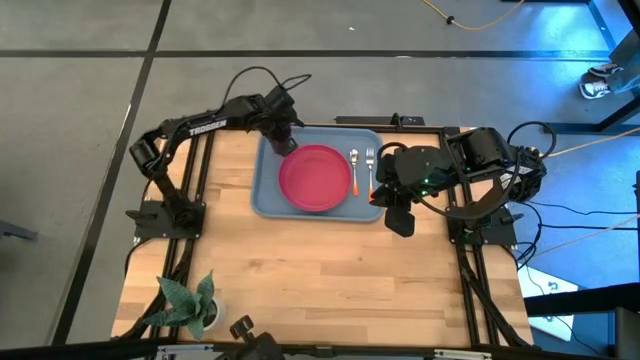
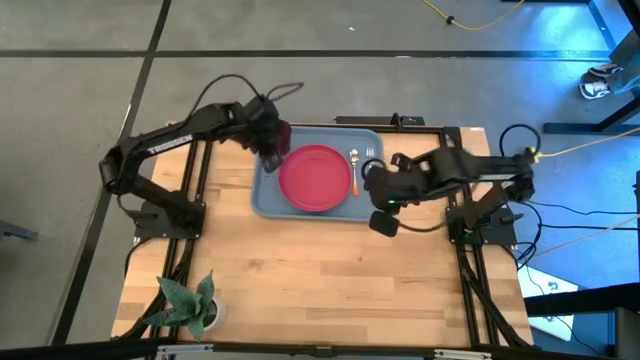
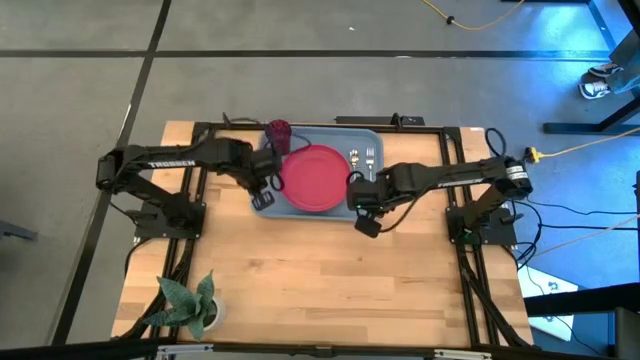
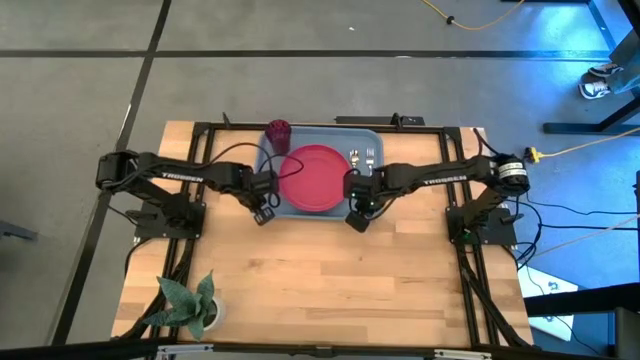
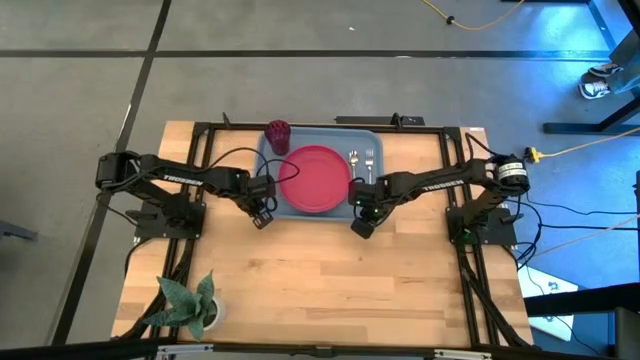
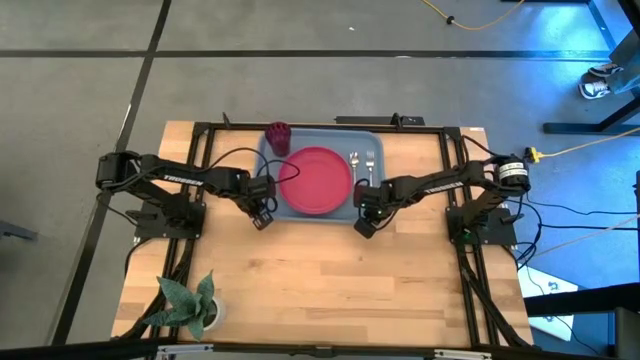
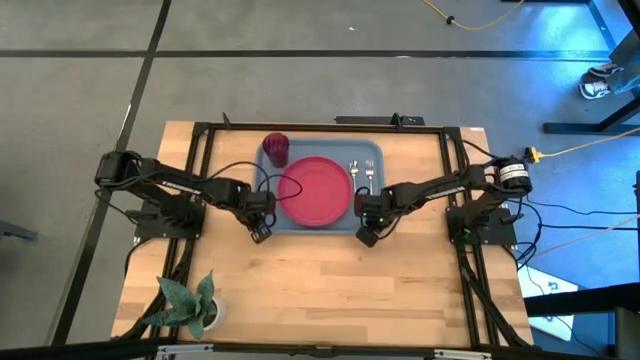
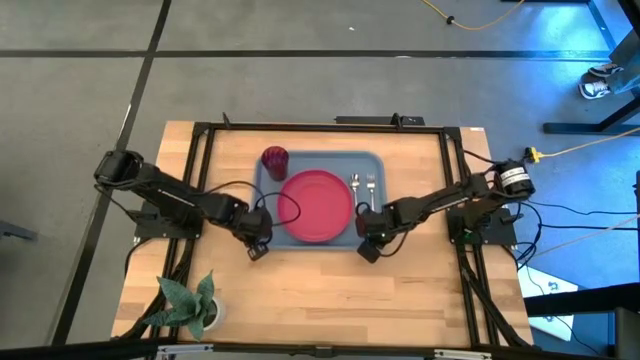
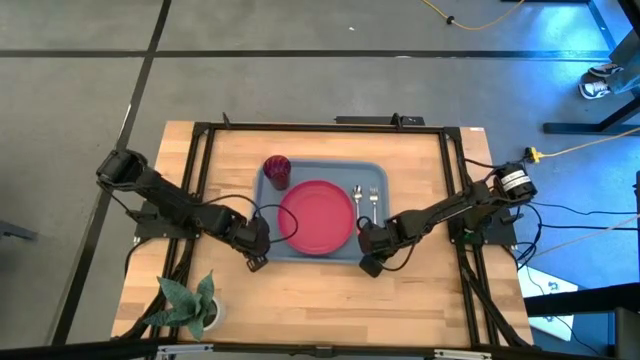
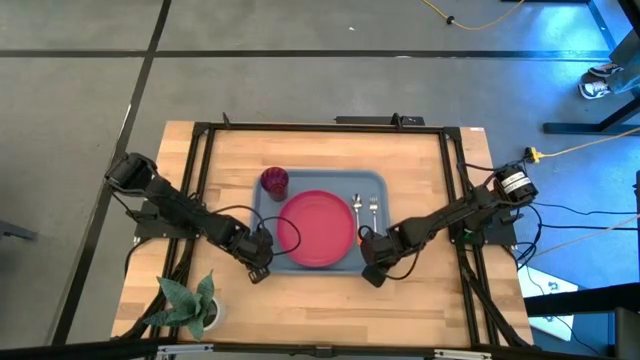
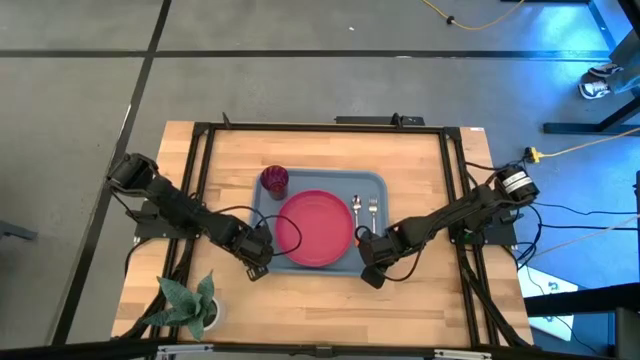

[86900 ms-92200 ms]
Task: Pick and place plate/cup/fork/spoon on tray
Move the blue serving tray to the middle of the table

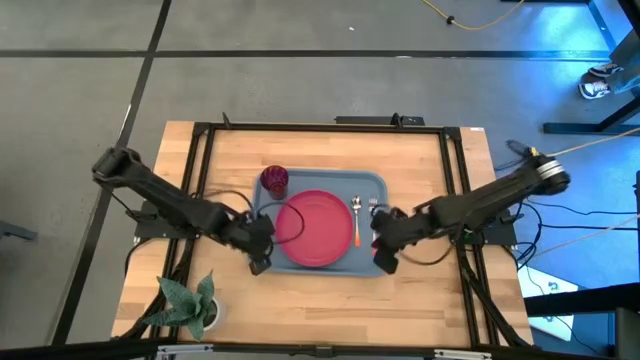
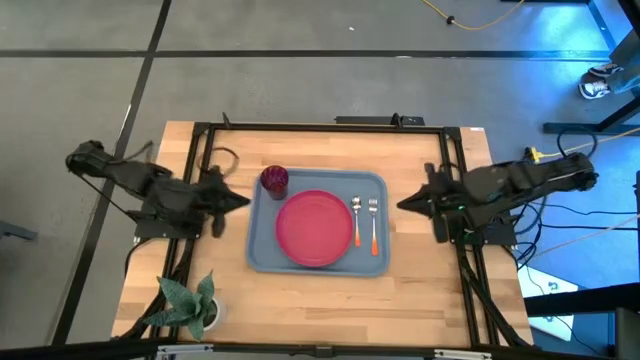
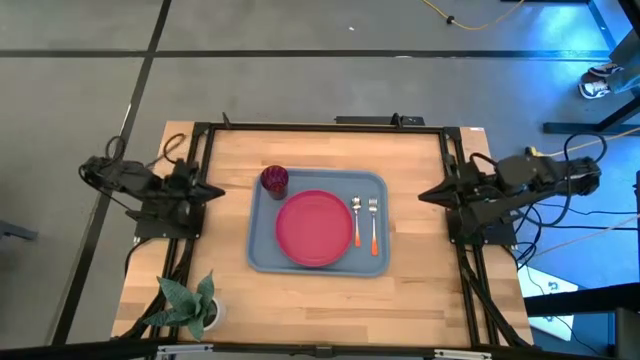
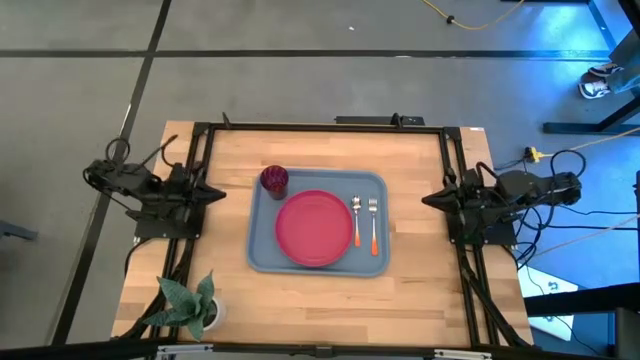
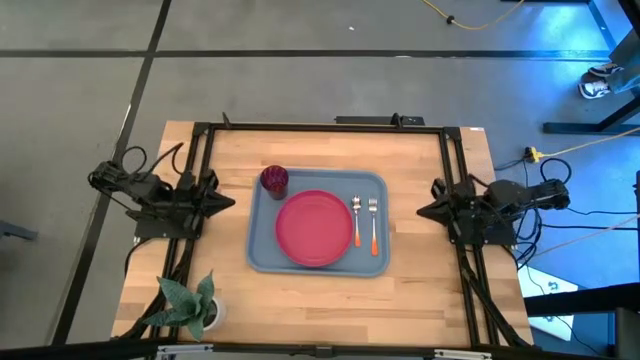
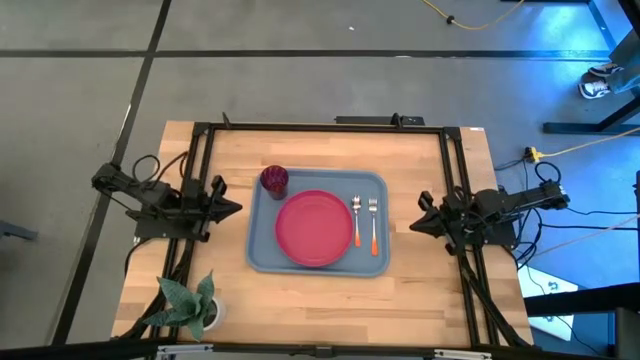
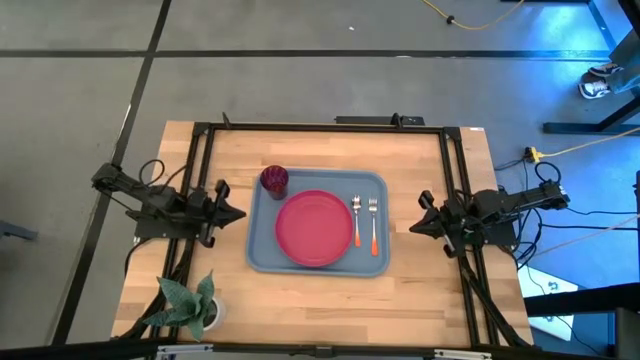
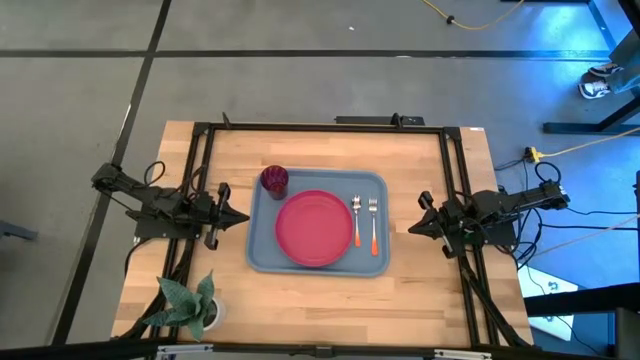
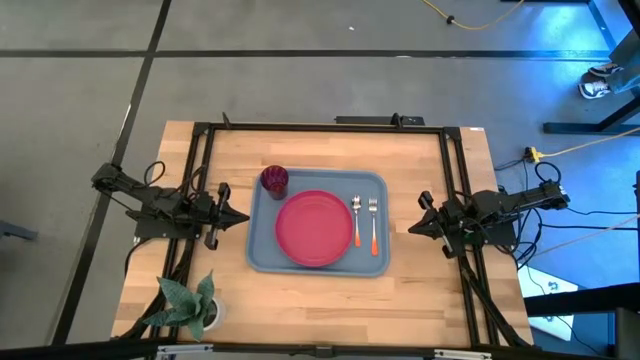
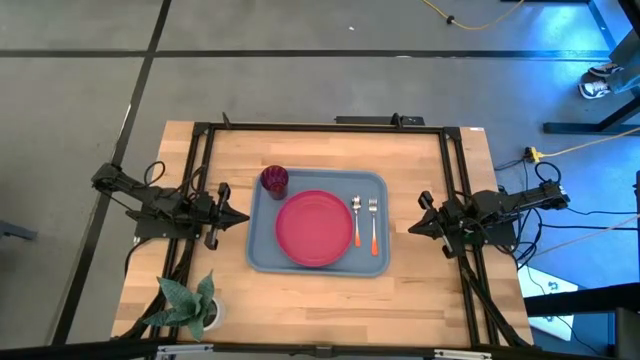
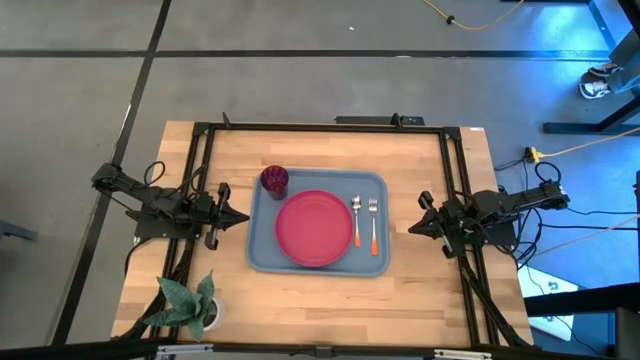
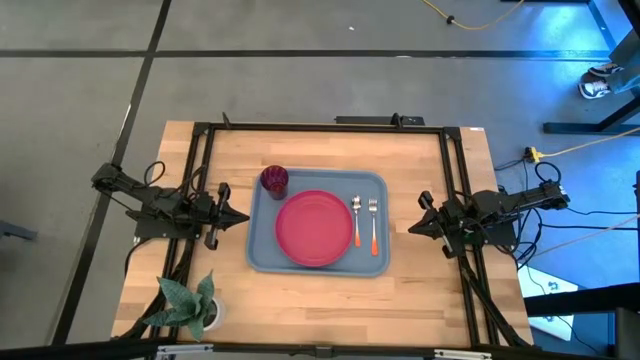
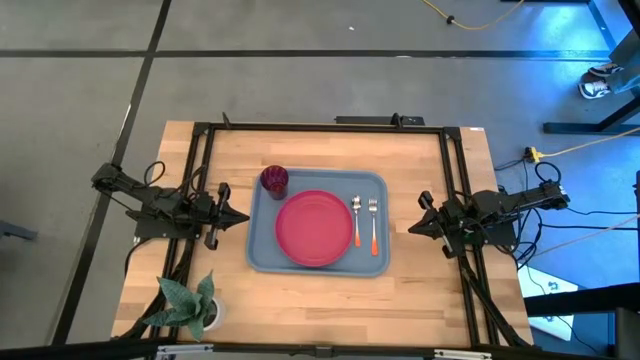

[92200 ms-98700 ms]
Return to Home Position

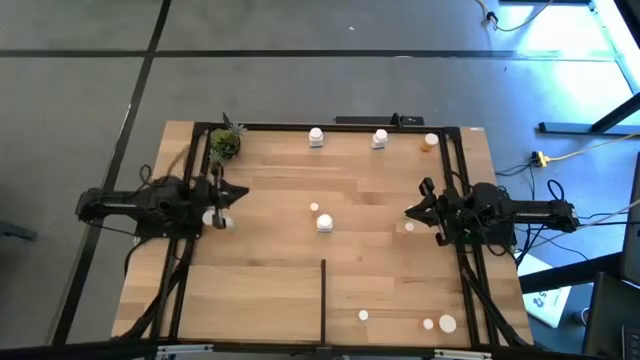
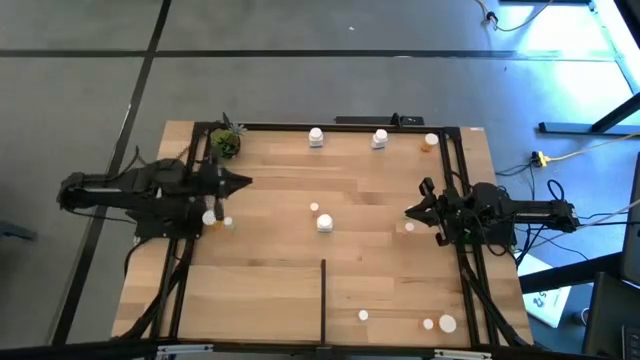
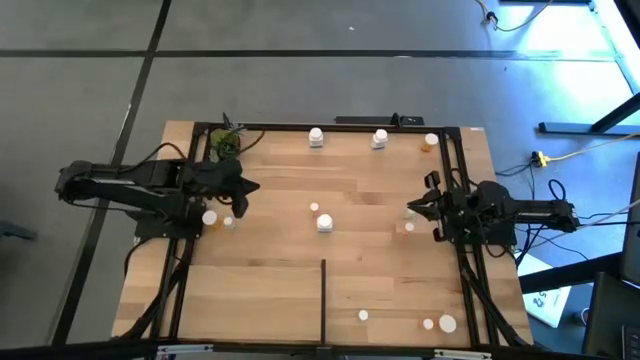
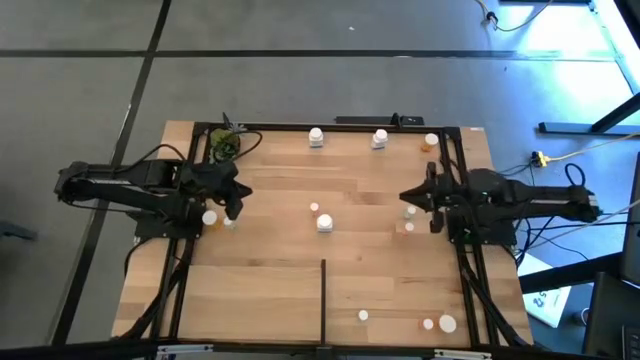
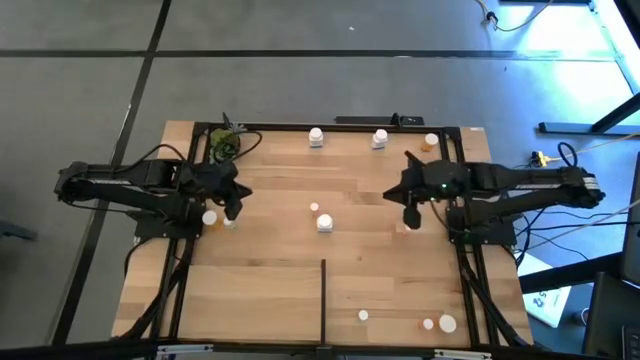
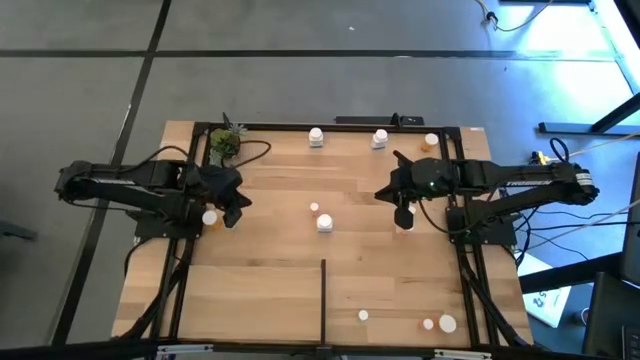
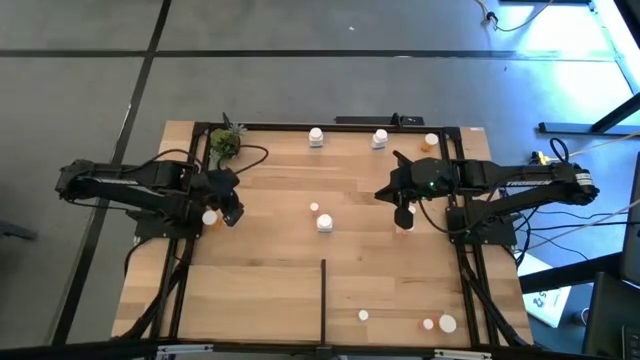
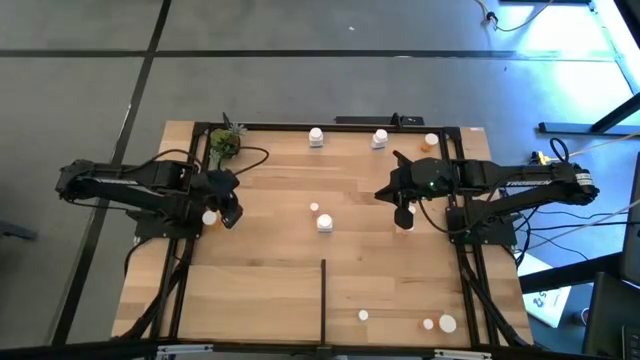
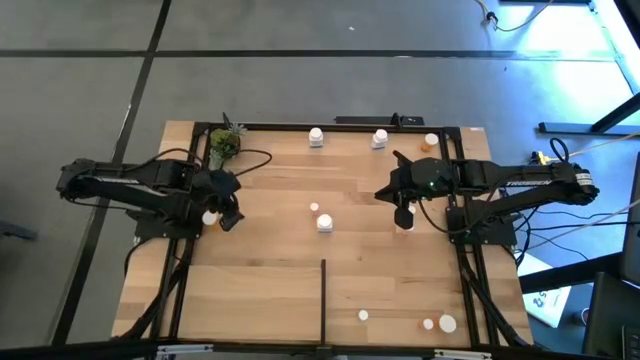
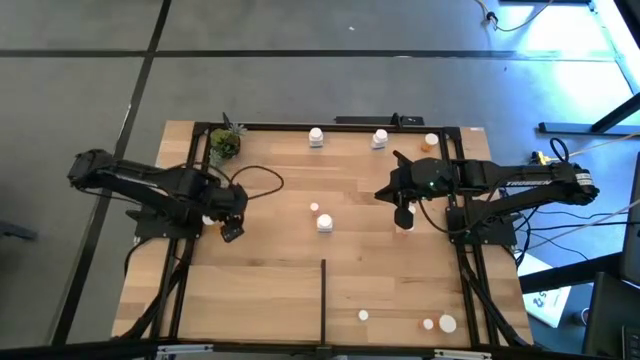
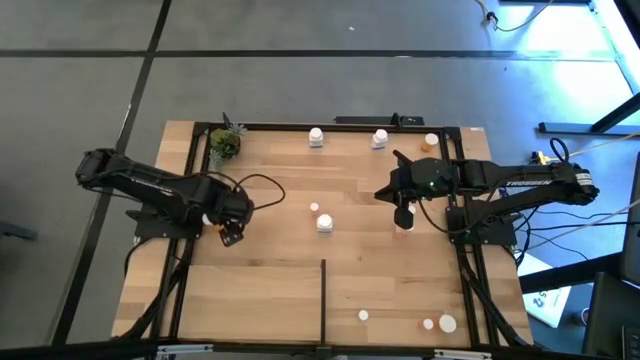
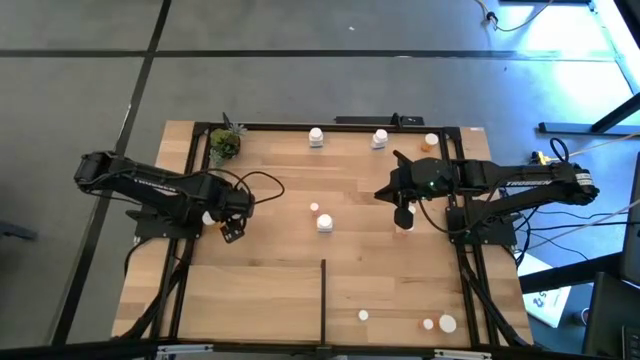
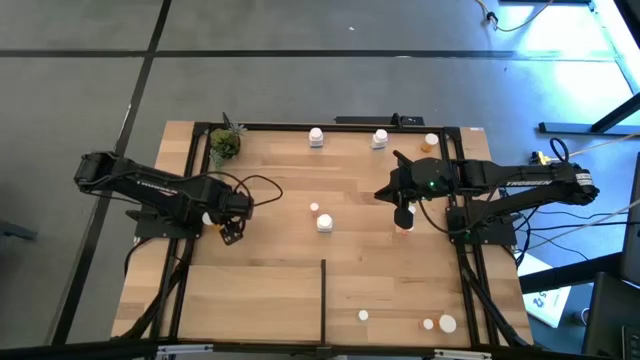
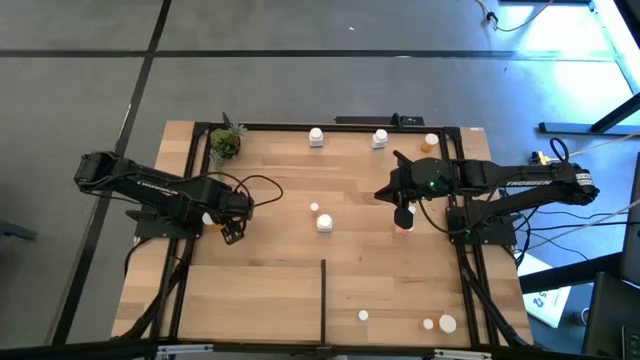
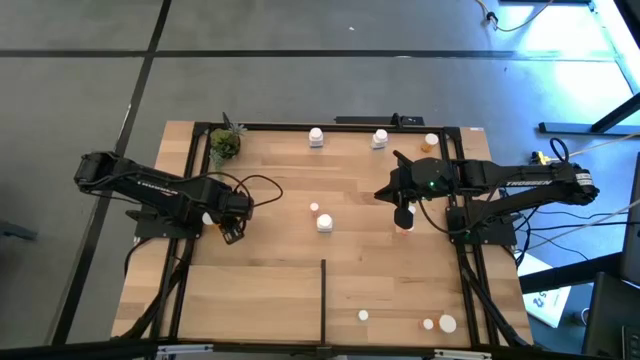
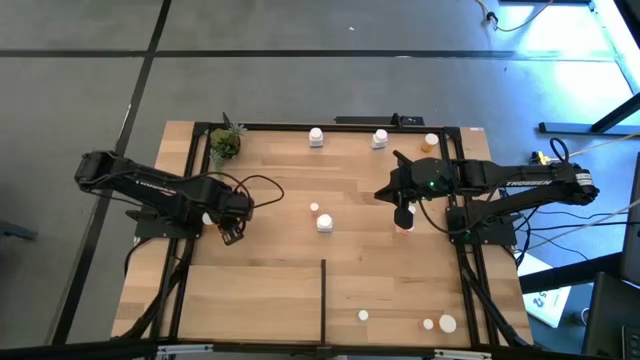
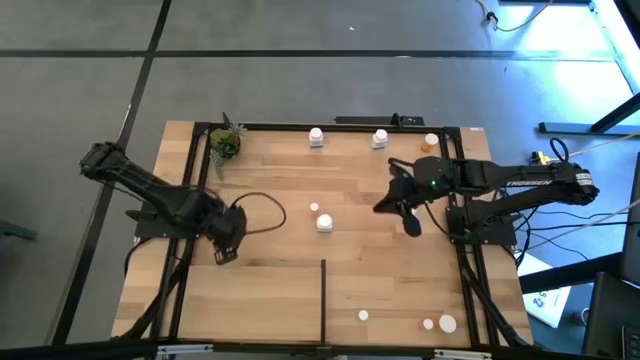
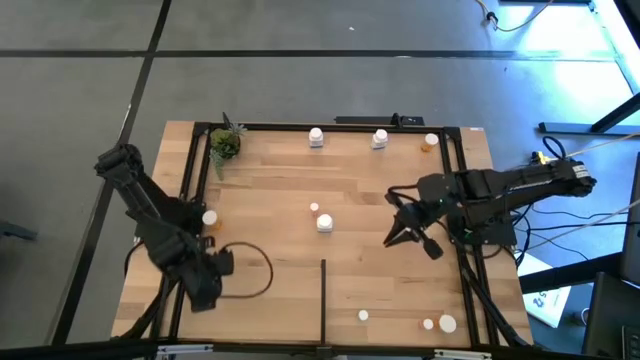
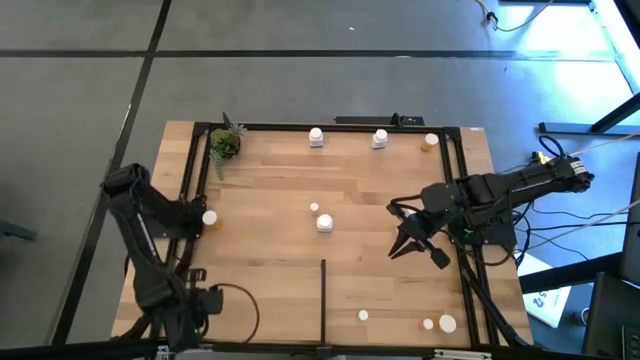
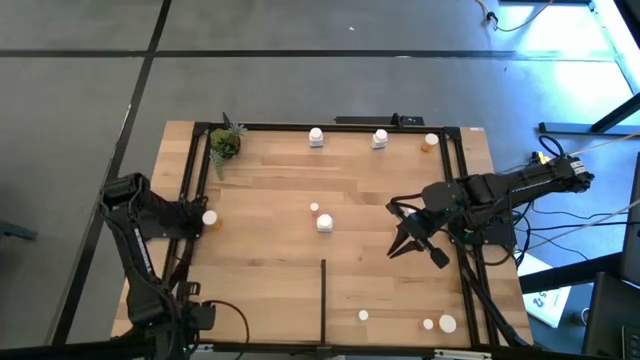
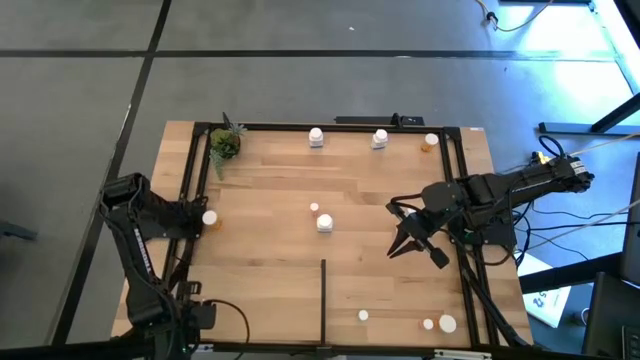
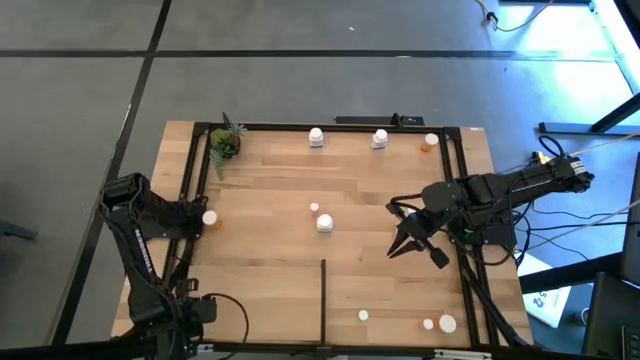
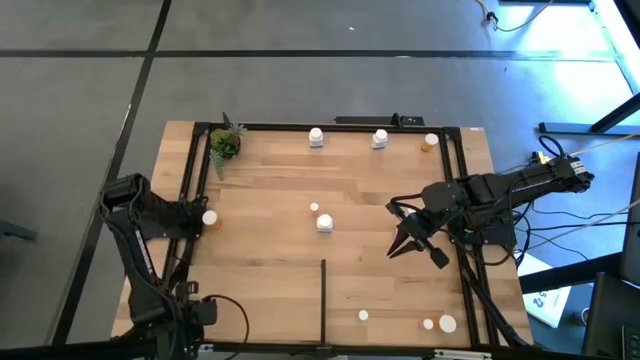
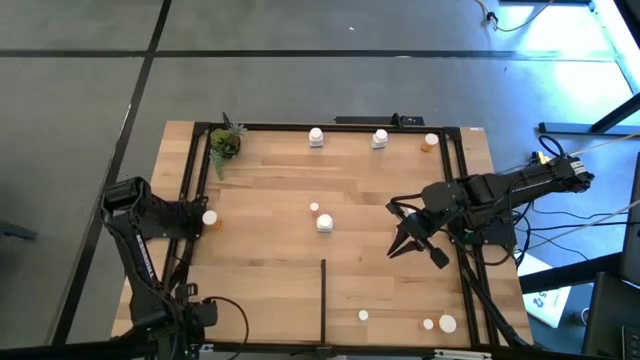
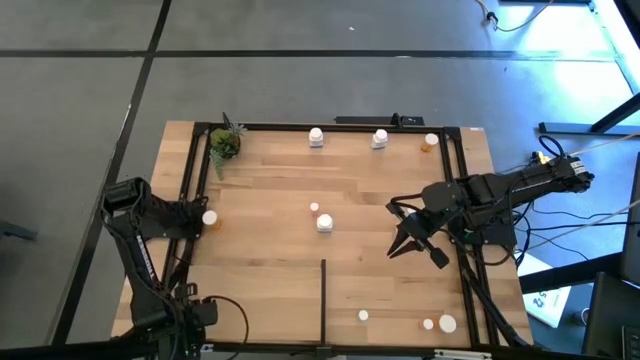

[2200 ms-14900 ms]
Task: Pick and place medicine bottles onto shelf by color
Put the top left blue pill bottle on the shelf
